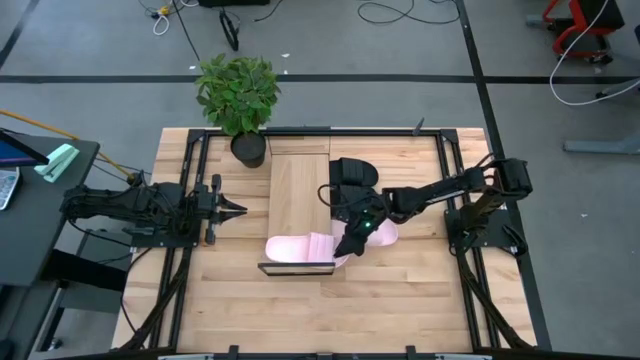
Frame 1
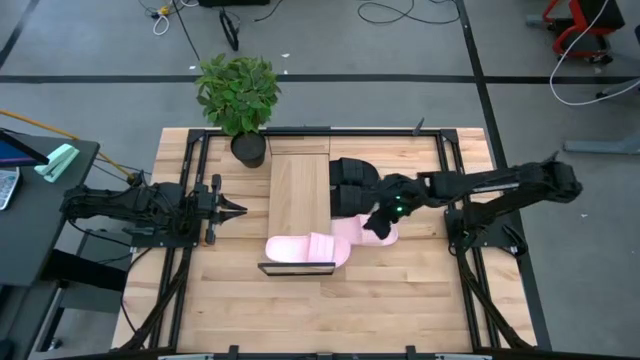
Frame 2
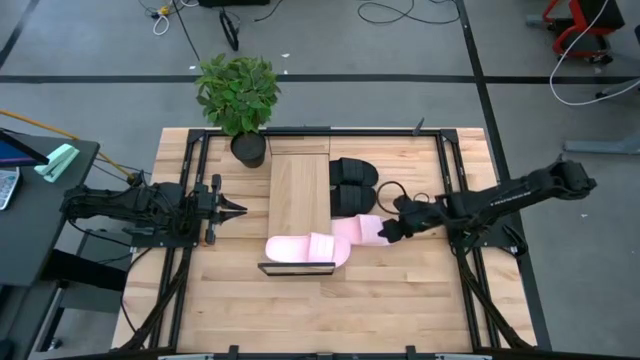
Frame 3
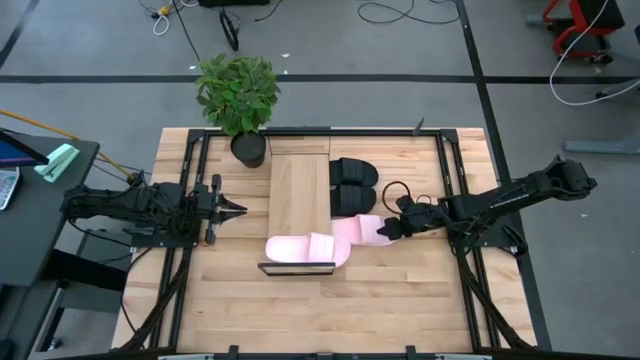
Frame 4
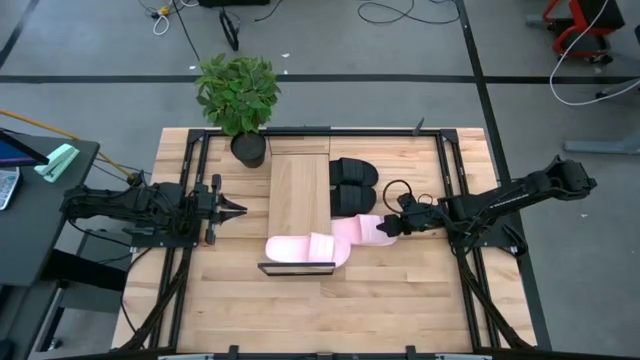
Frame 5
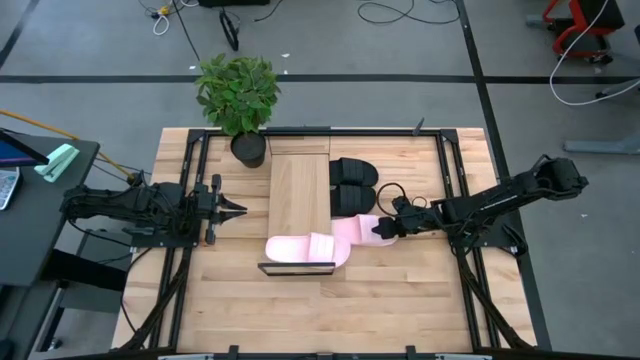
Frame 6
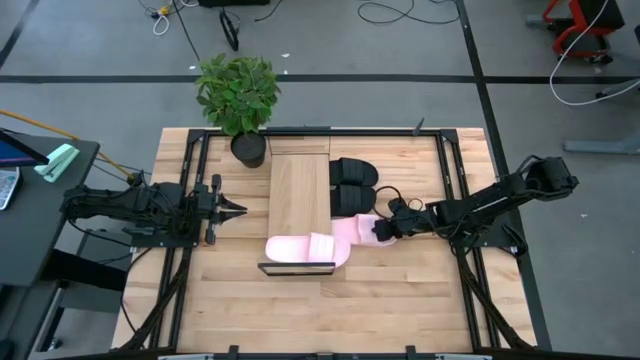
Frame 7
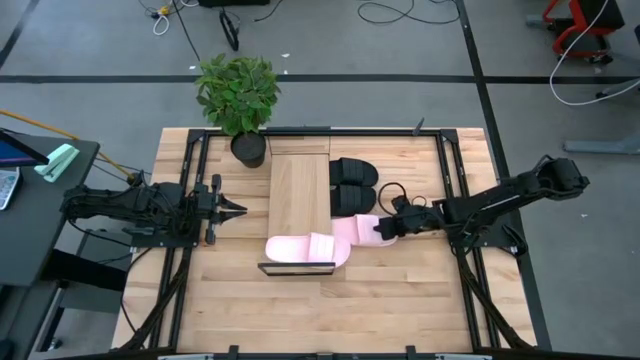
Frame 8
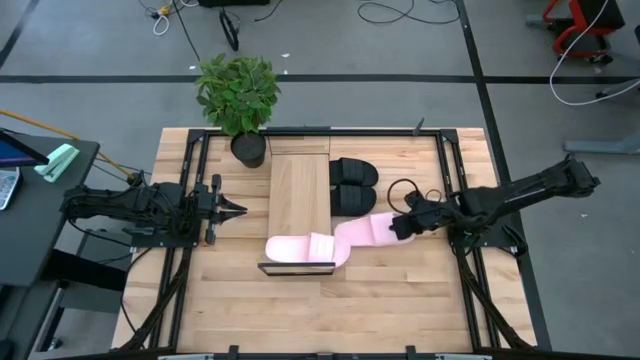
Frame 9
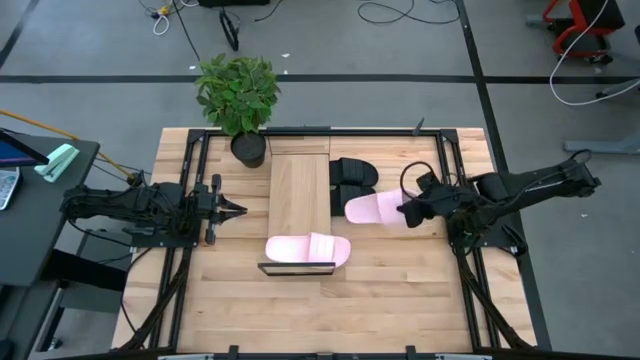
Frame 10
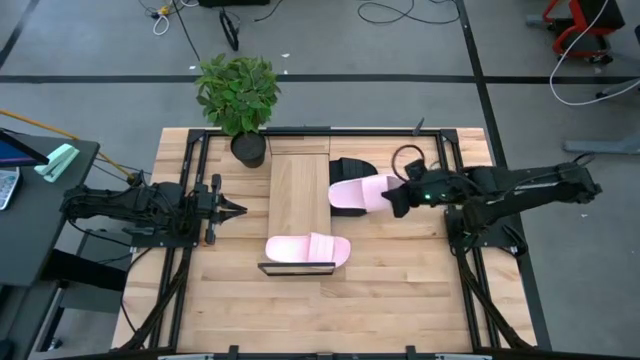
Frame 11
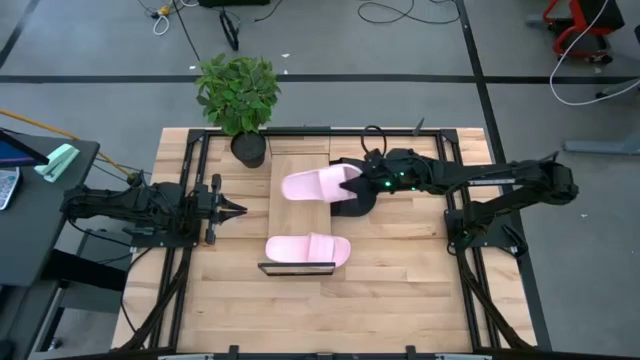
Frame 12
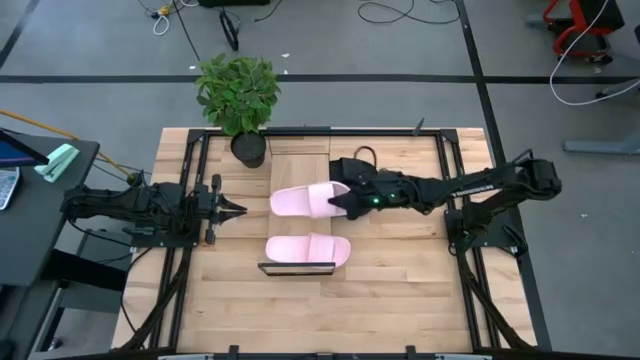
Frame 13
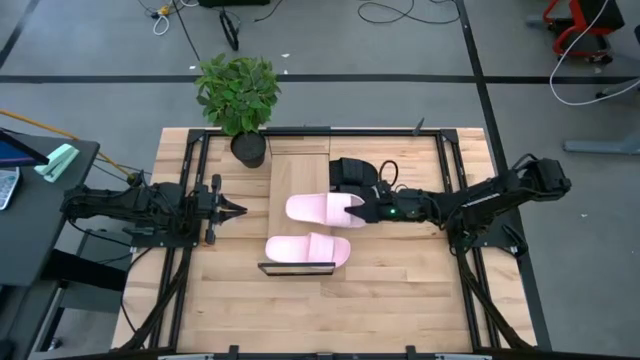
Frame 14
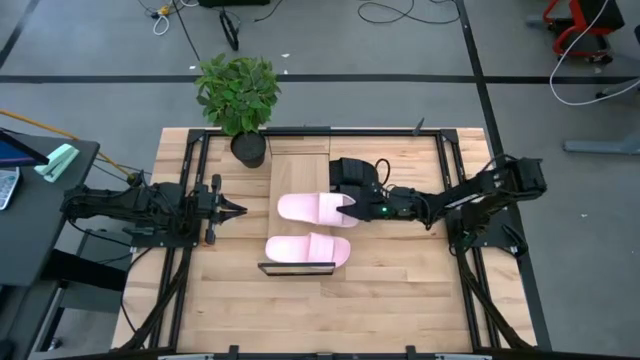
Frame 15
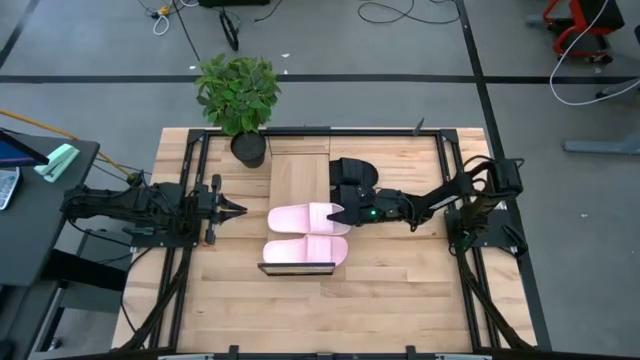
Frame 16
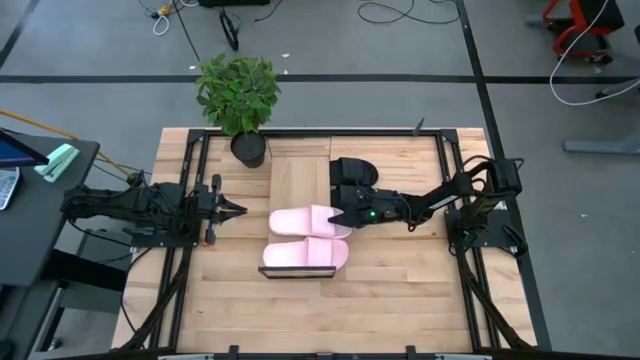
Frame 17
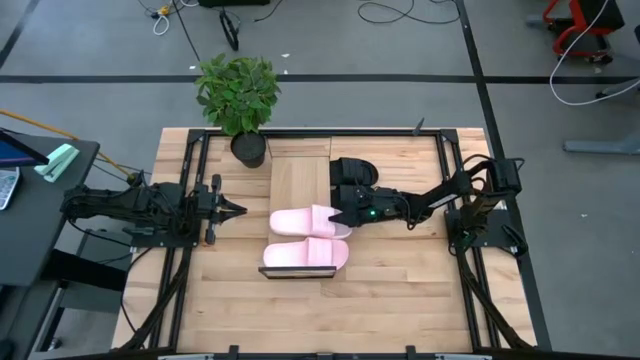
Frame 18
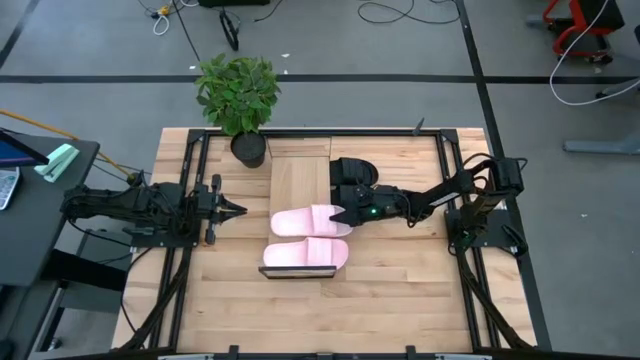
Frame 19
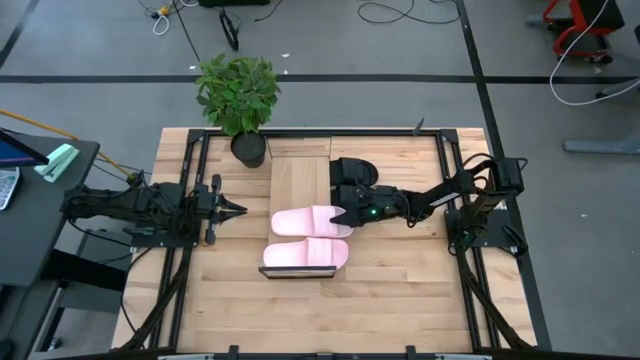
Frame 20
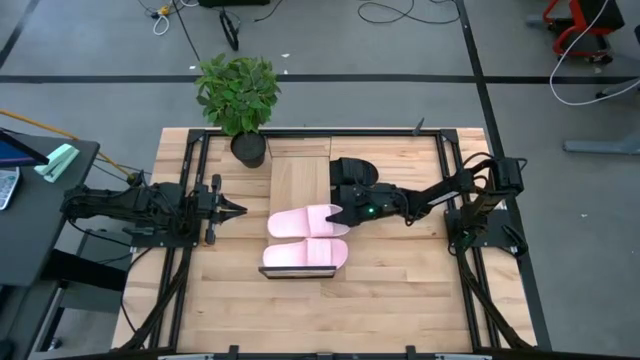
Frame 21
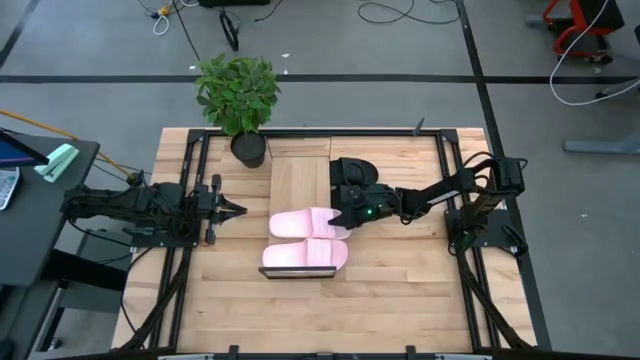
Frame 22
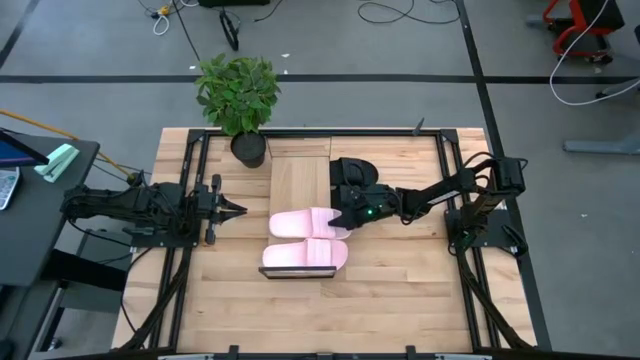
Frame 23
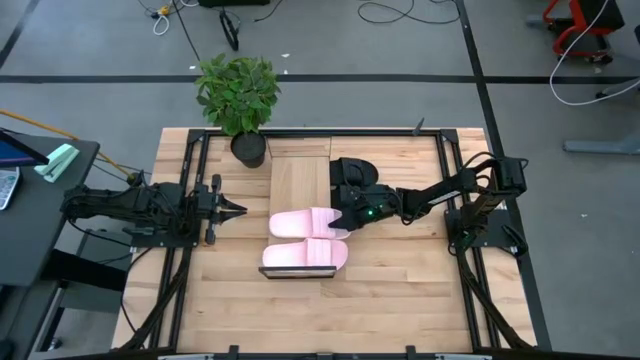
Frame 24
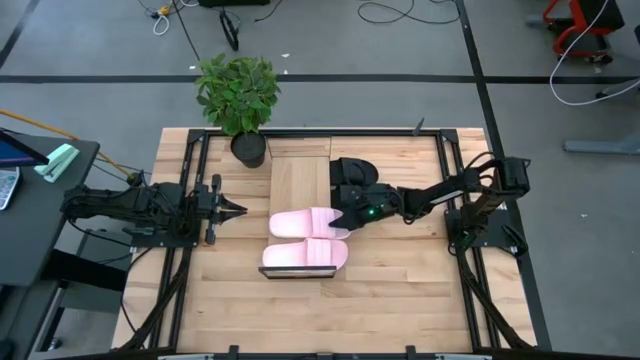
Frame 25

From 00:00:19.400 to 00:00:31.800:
Task: Pick and place slides into the shelf
Put the pink slipper on the shelf

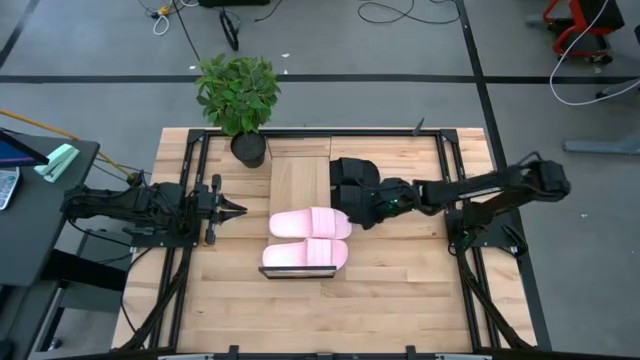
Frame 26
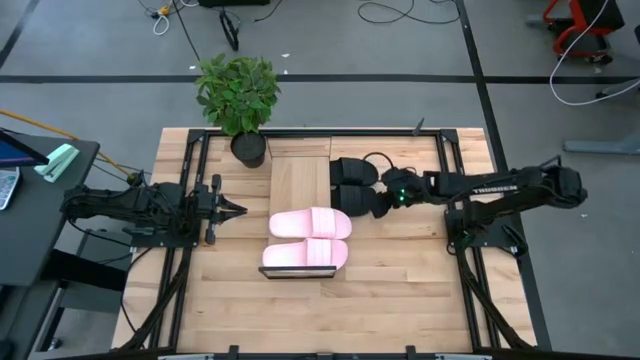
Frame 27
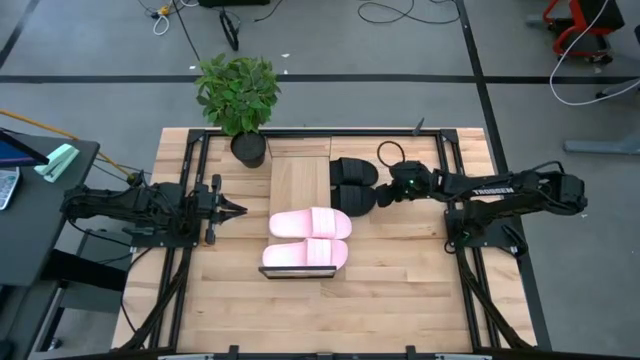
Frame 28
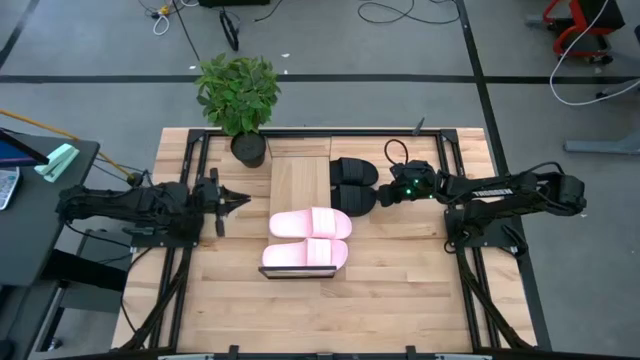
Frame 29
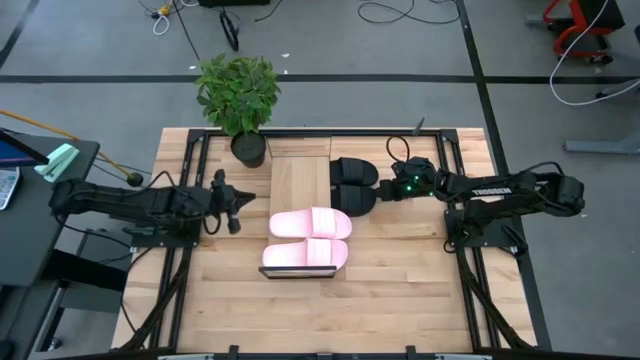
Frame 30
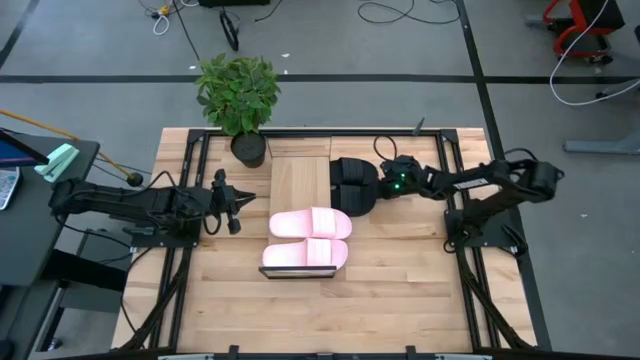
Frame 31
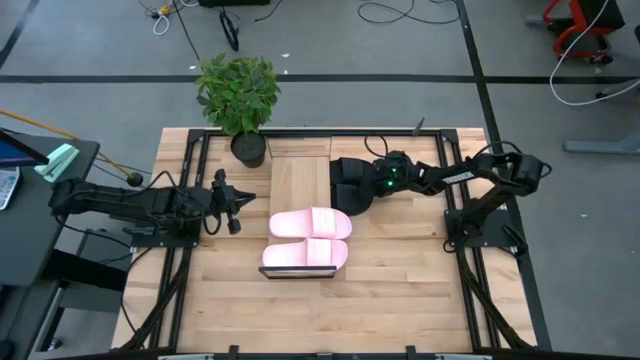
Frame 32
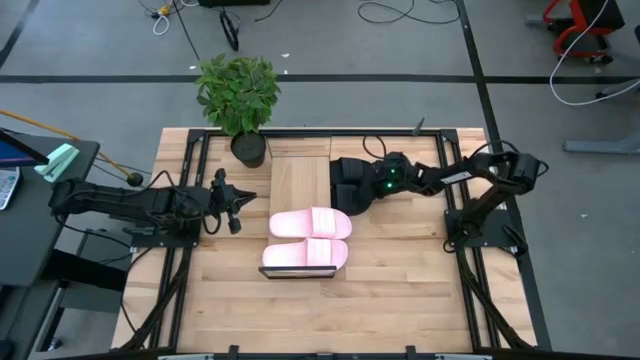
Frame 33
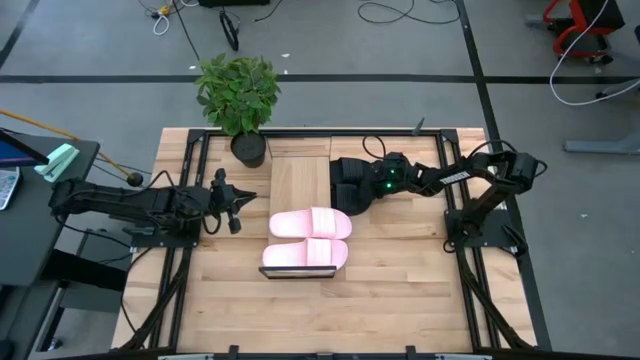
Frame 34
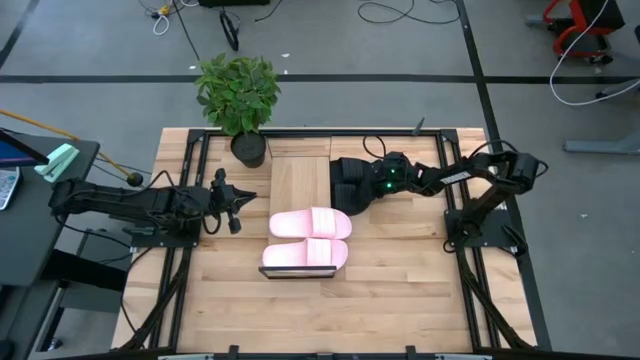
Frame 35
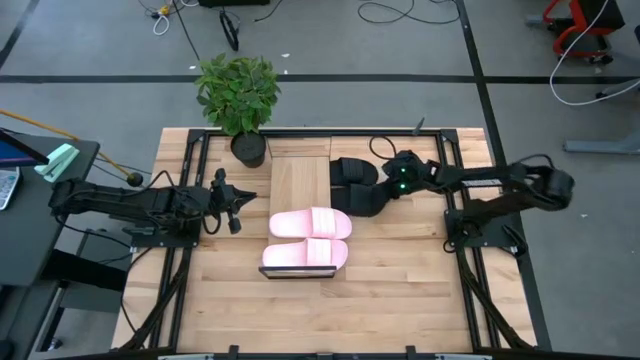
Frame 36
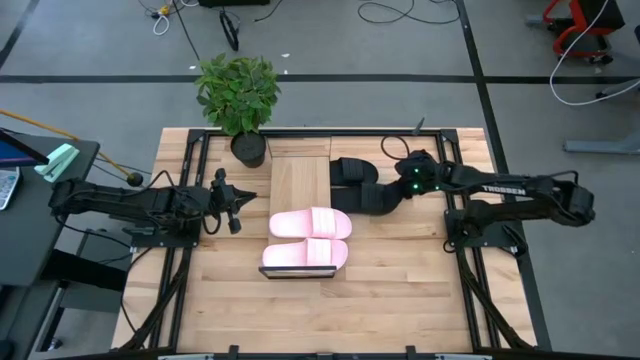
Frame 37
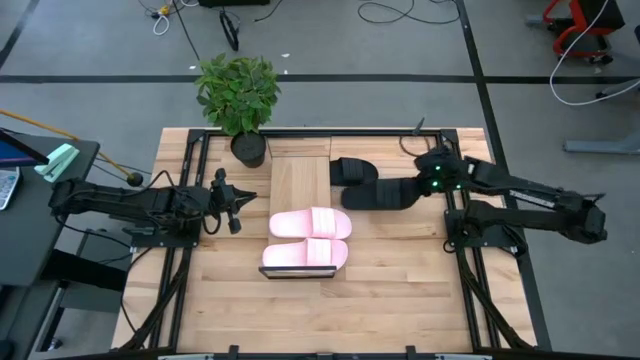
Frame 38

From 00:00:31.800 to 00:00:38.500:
Put the bottom black slipper on the shelf
